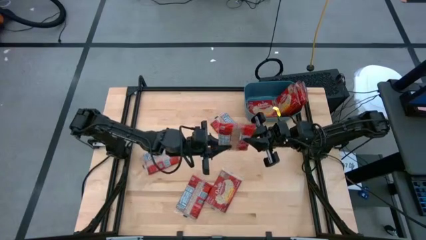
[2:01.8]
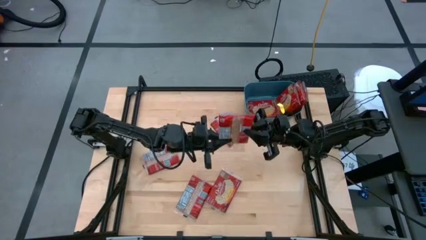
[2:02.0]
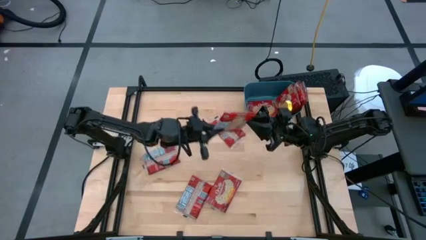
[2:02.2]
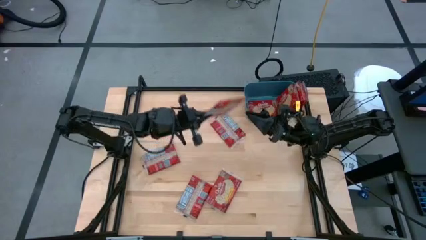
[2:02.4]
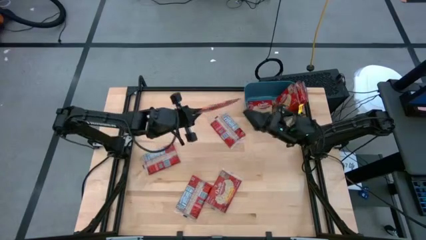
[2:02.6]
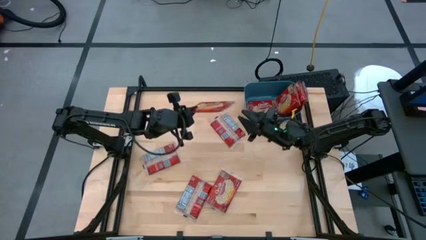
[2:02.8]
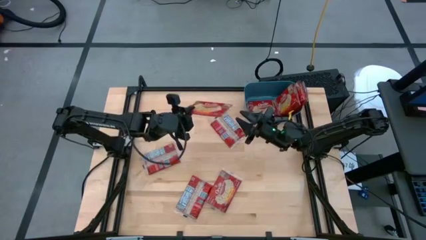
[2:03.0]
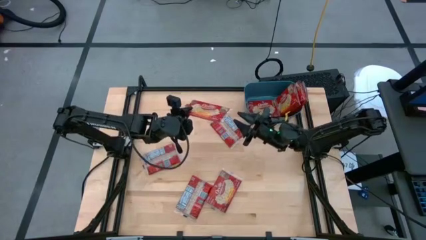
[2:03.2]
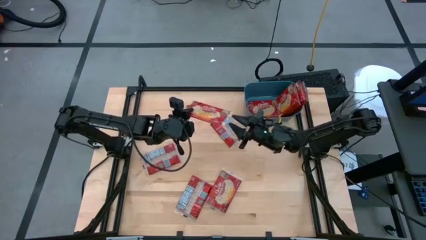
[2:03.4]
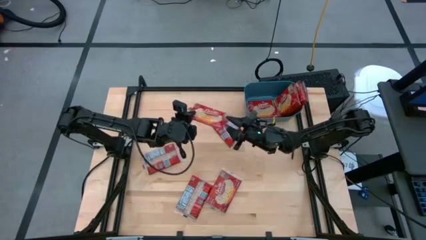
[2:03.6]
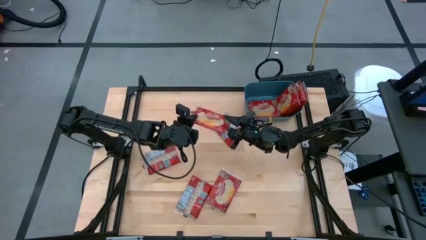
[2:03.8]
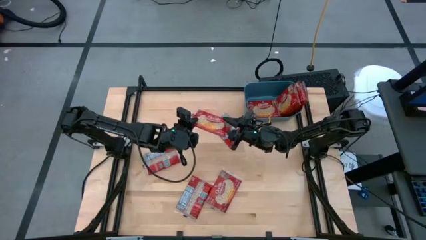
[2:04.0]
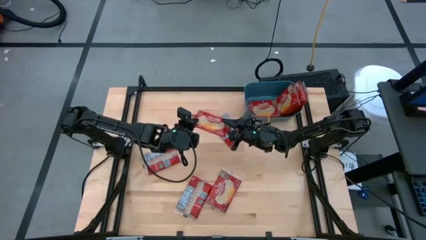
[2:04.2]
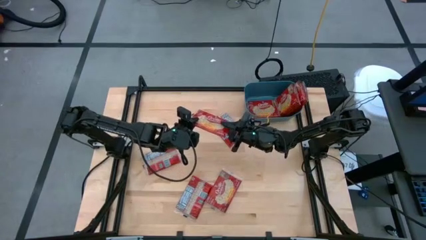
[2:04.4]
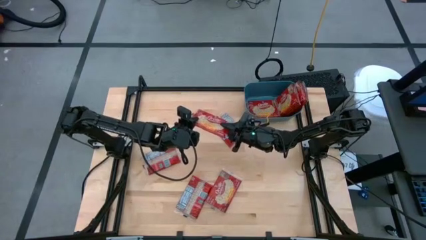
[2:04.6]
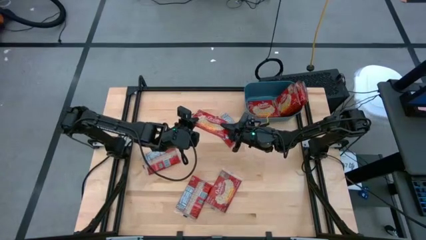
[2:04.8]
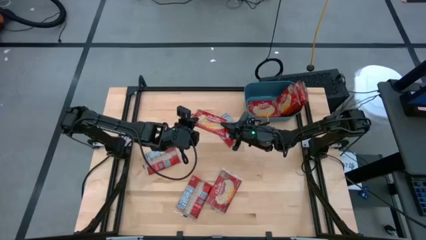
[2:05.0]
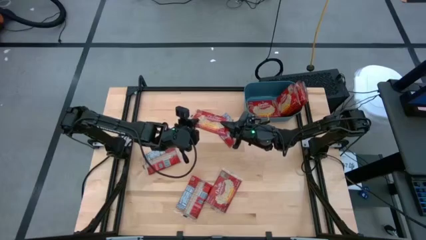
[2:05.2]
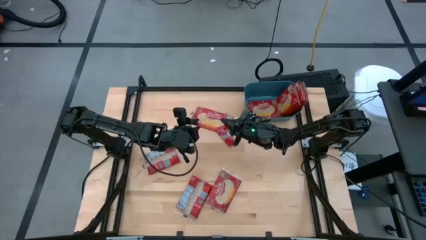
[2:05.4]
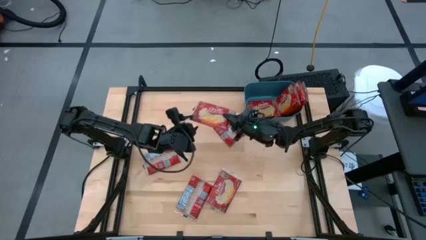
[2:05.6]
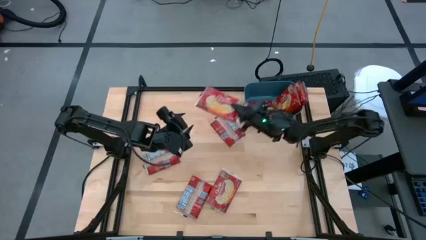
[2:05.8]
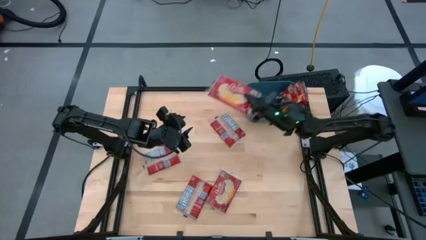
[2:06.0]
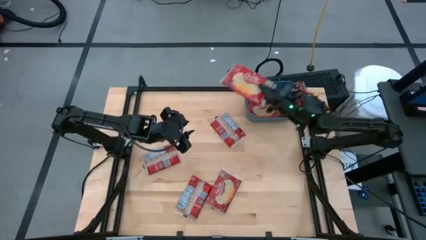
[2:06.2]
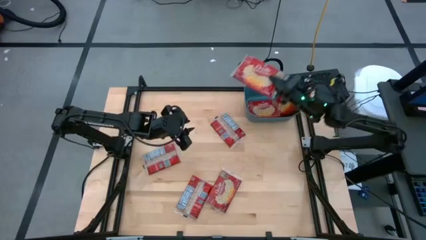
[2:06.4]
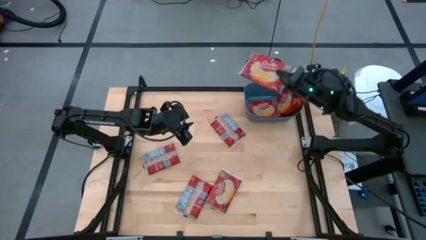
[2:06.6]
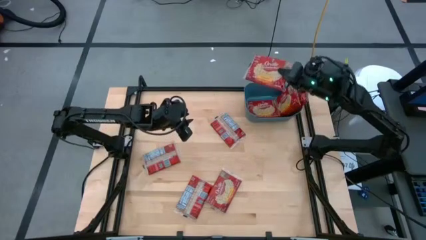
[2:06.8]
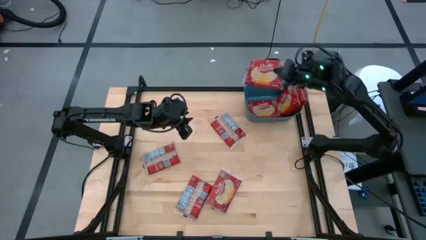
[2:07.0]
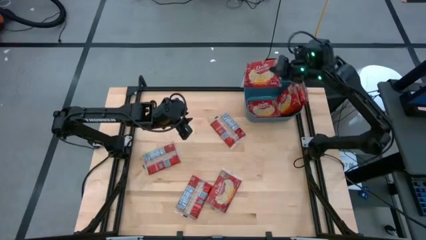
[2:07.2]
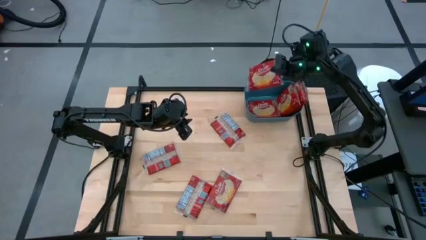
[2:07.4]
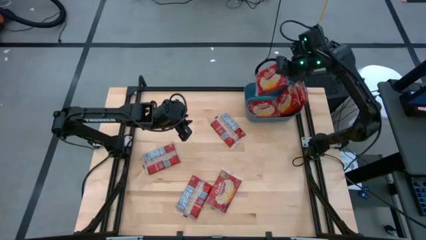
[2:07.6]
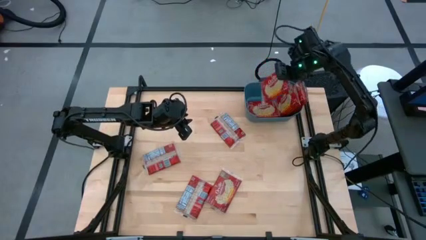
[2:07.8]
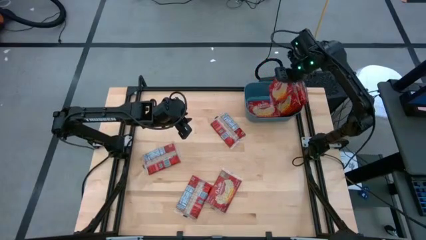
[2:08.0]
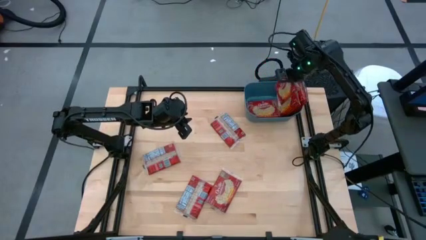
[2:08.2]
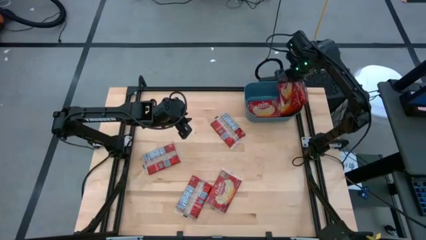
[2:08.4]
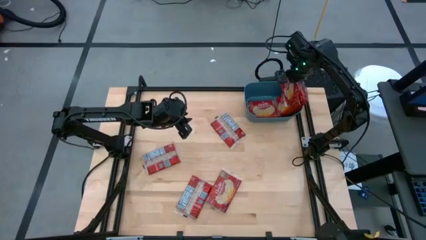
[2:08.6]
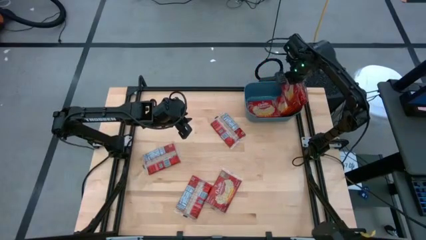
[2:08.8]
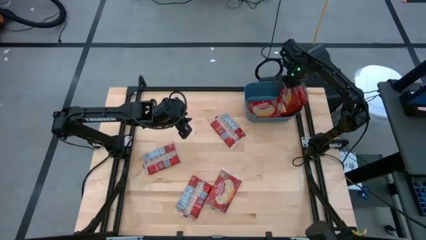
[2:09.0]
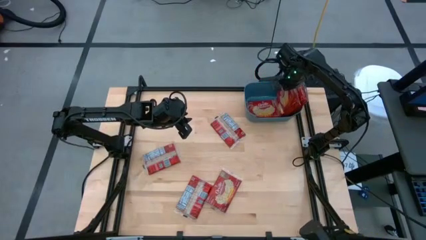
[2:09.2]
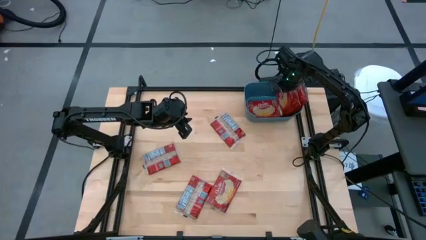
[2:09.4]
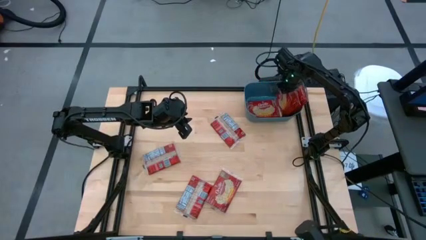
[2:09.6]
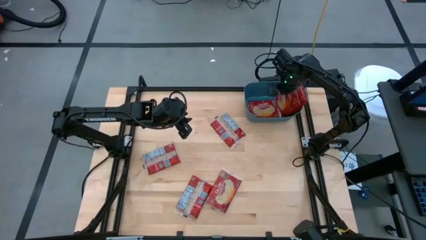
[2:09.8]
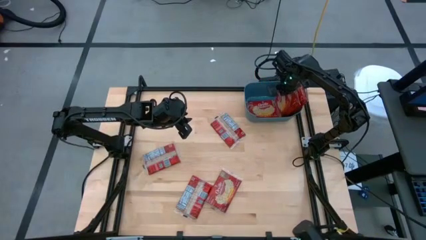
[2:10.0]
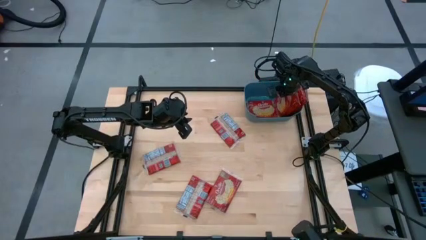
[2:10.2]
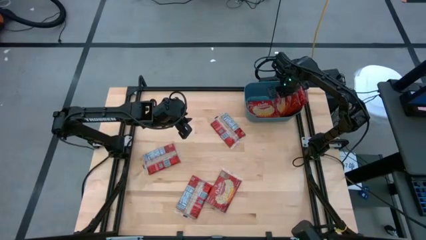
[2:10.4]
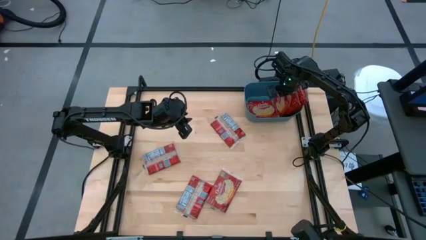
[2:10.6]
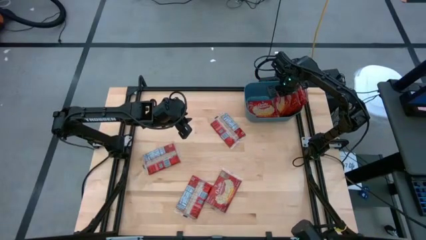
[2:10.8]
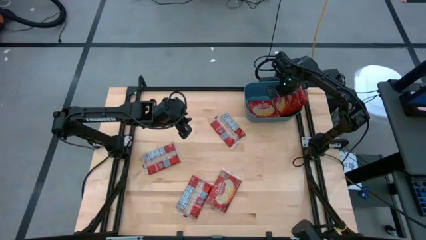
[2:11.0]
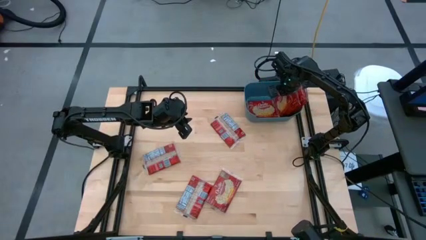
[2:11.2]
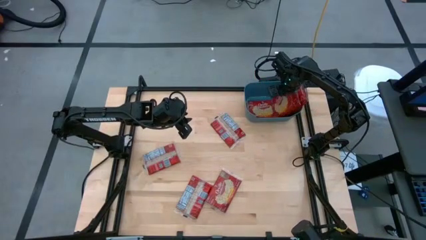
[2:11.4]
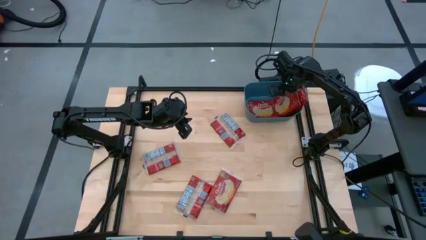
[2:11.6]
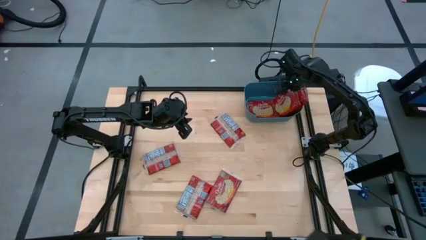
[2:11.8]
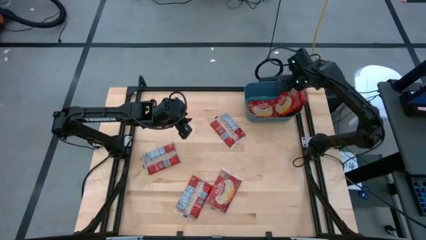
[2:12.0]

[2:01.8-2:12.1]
Task: Sort popcorn bags into baskets
Put the popcorn bag into the blue bin

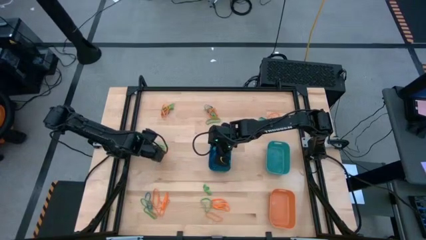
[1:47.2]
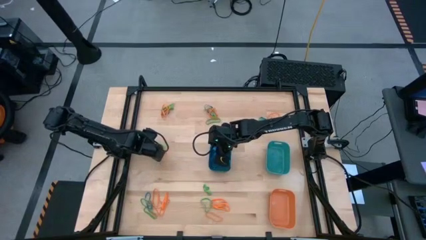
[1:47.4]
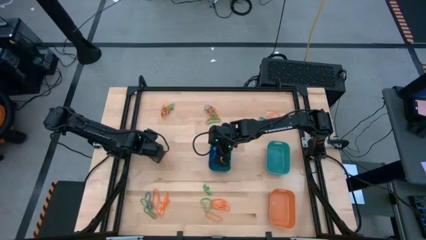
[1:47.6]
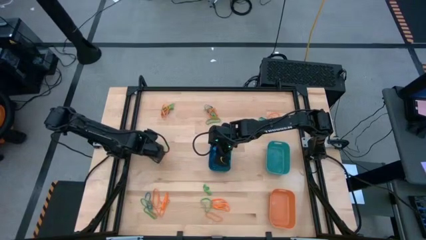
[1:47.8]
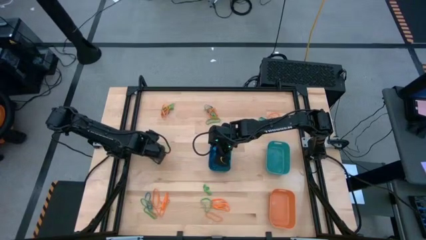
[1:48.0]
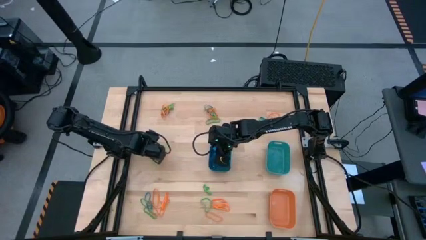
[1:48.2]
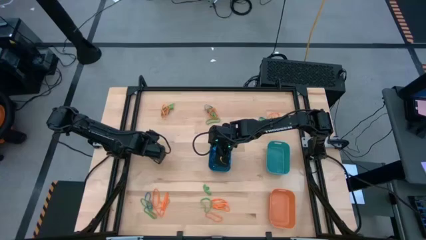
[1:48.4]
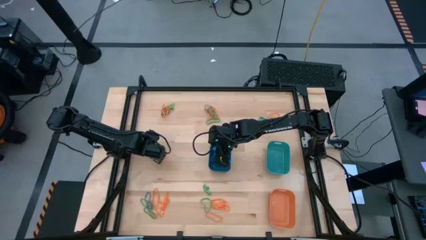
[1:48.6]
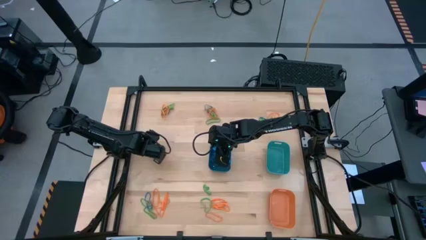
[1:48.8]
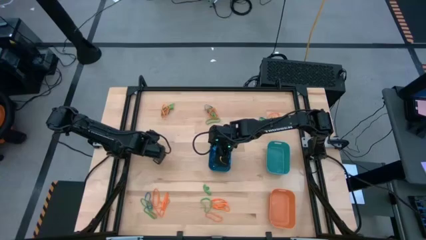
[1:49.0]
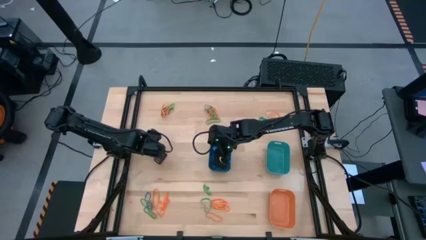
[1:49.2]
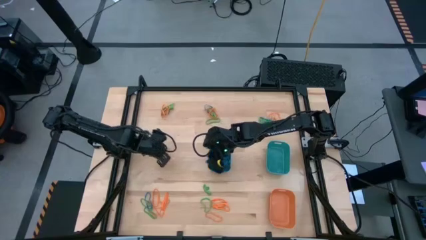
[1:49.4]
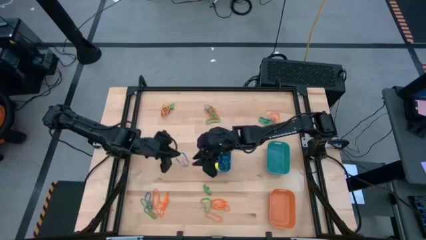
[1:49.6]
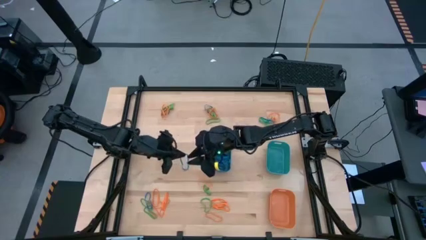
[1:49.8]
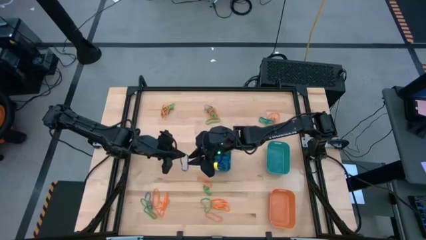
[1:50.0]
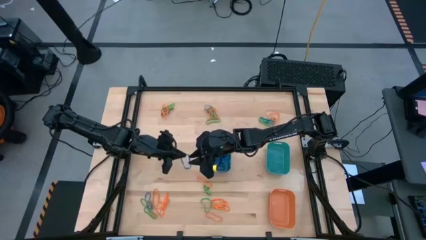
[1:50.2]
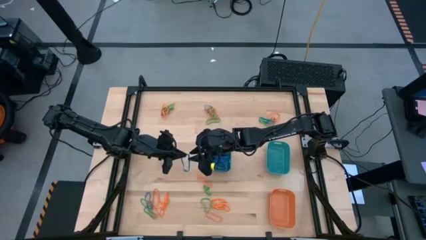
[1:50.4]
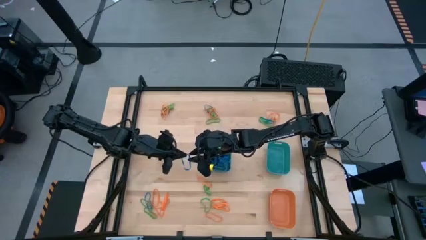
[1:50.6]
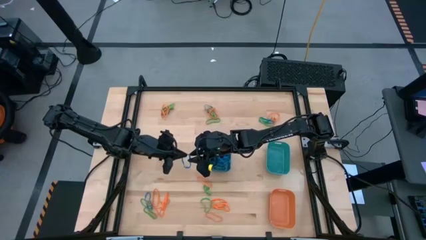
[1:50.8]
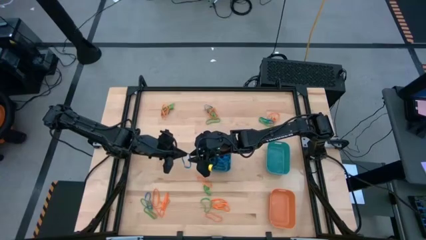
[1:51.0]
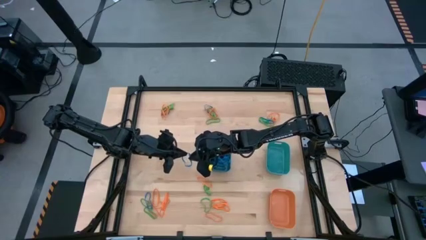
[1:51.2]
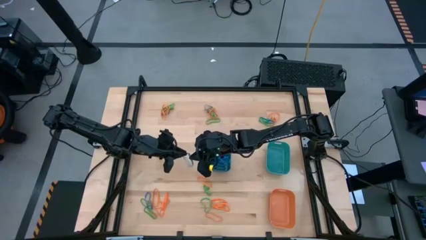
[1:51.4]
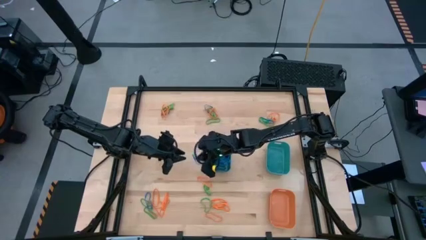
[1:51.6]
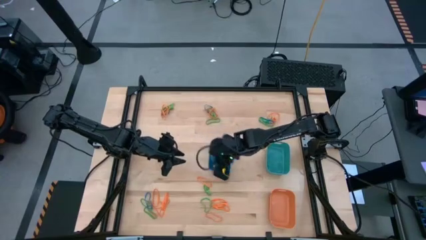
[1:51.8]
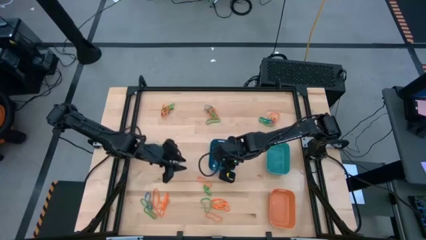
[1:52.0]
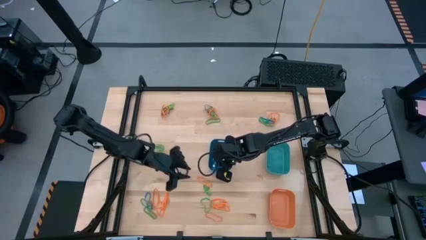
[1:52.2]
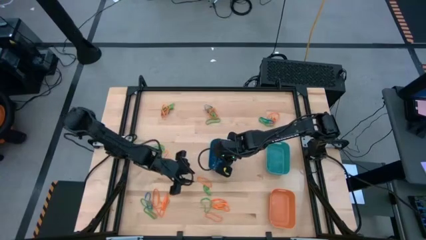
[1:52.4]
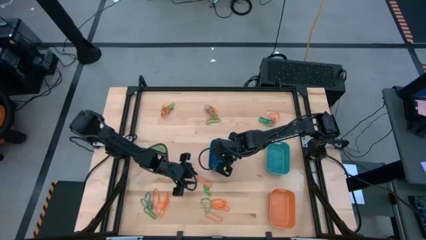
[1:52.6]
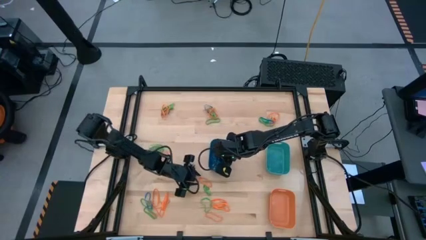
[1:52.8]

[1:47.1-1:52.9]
Task: Sort rubber bands into baskets
Put the blue rubberband into the blue bin

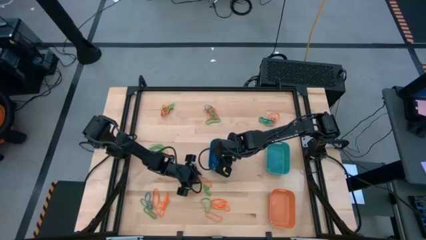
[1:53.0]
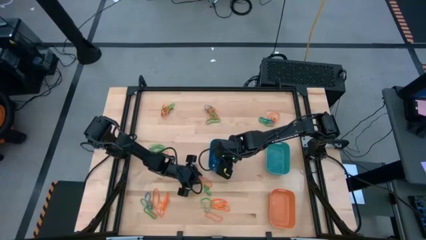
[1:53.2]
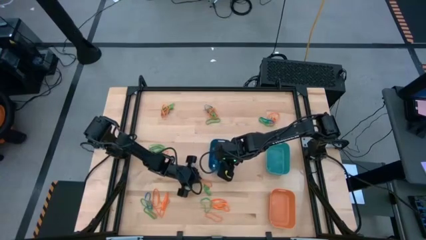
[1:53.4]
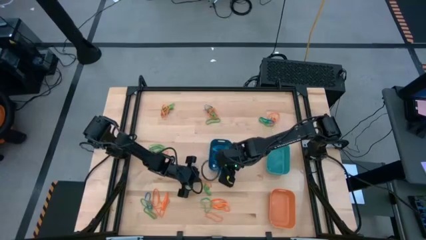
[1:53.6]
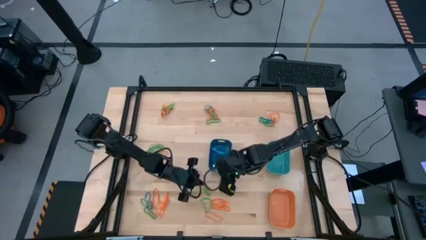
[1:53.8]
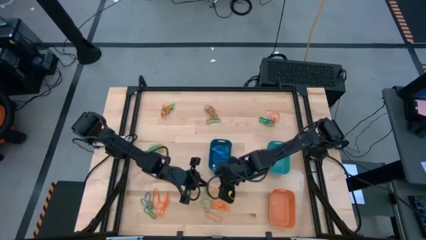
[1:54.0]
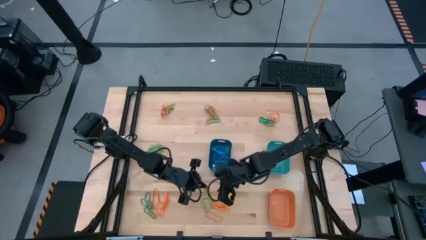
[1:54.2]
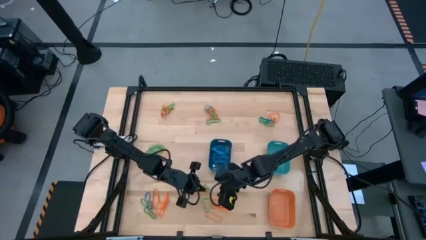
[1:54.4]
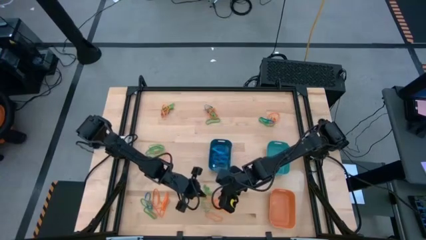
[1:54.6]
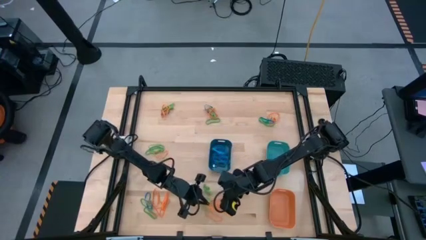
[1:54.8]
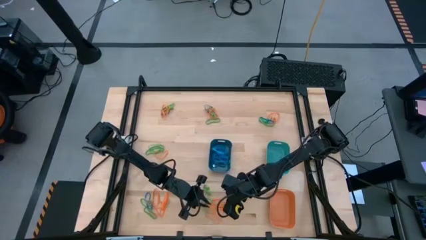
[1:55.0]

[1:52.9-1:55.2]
Put the orange rubberband into the orange bin
